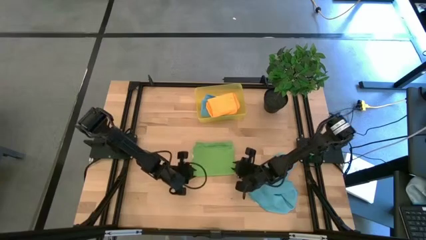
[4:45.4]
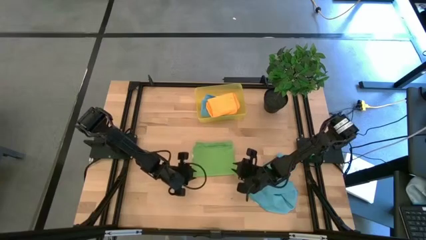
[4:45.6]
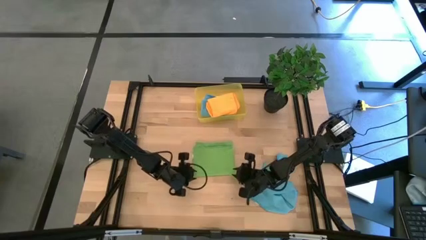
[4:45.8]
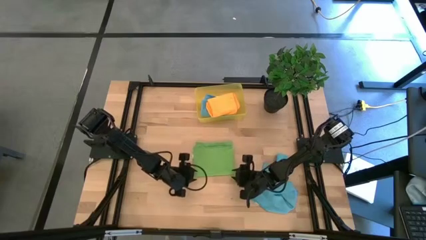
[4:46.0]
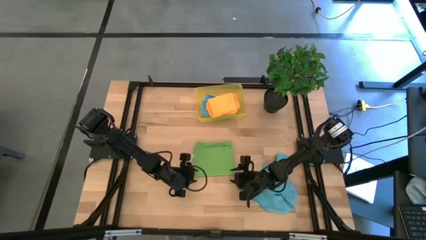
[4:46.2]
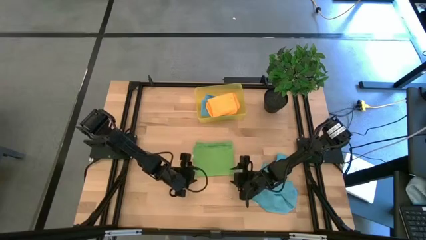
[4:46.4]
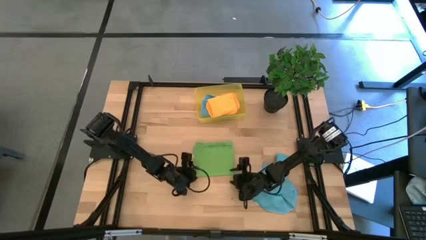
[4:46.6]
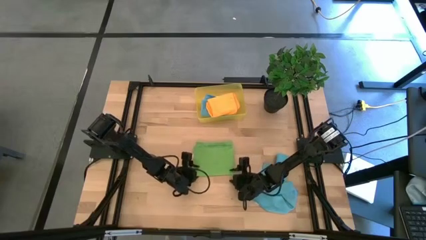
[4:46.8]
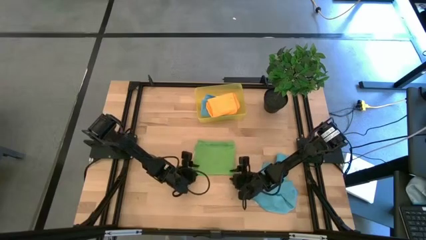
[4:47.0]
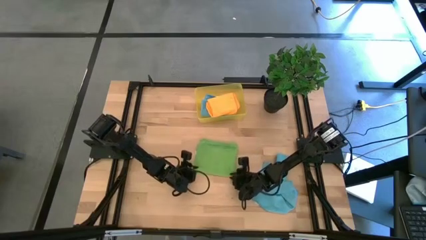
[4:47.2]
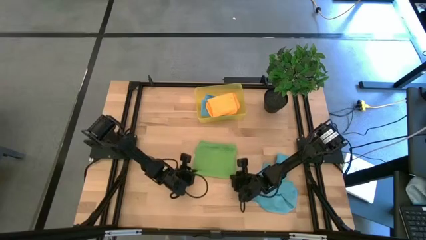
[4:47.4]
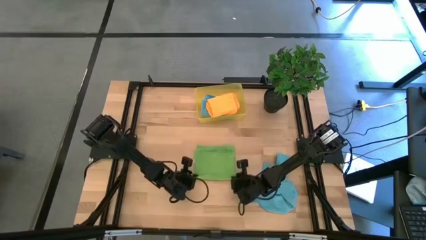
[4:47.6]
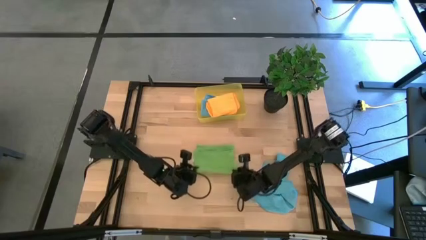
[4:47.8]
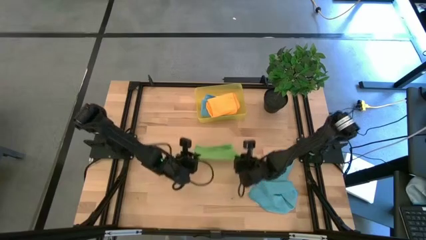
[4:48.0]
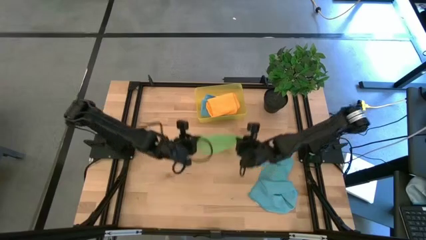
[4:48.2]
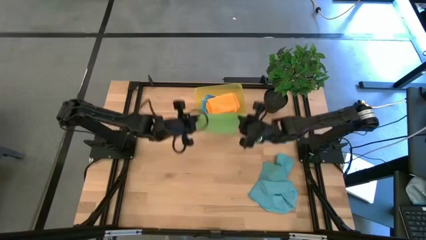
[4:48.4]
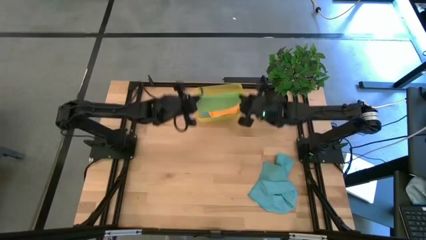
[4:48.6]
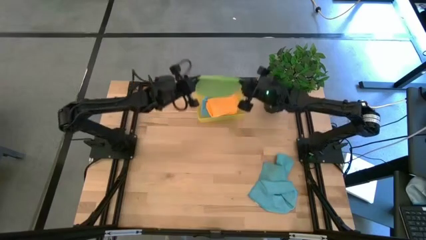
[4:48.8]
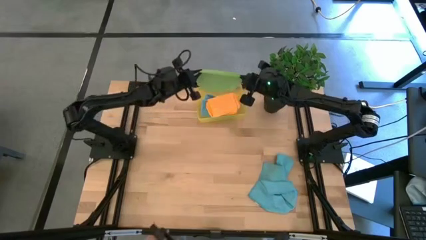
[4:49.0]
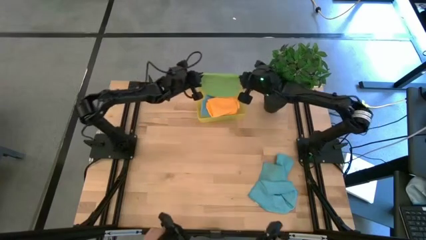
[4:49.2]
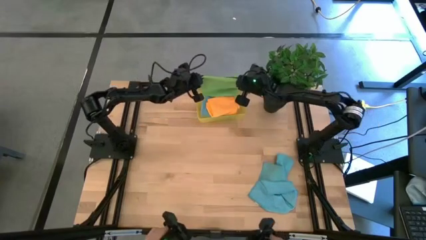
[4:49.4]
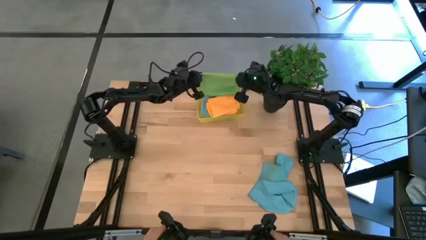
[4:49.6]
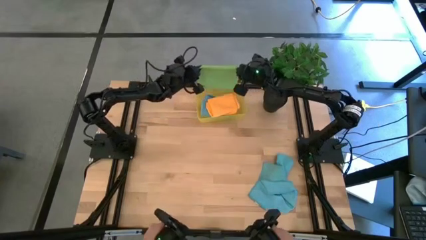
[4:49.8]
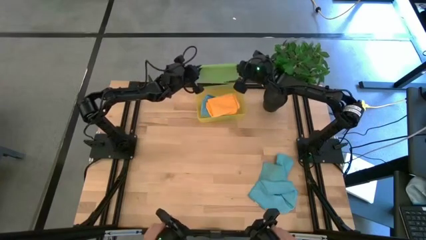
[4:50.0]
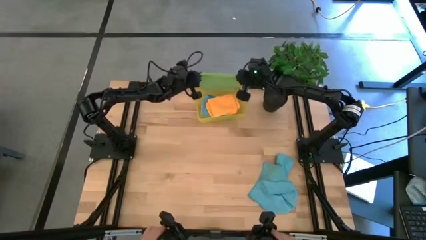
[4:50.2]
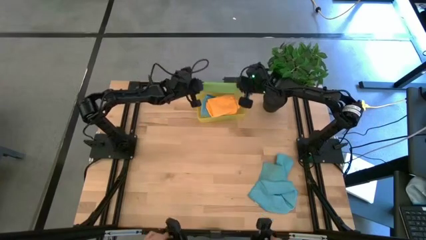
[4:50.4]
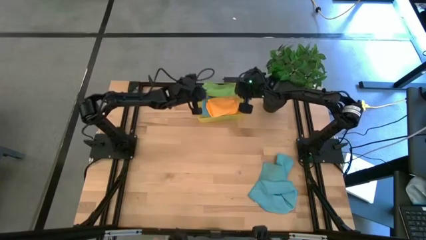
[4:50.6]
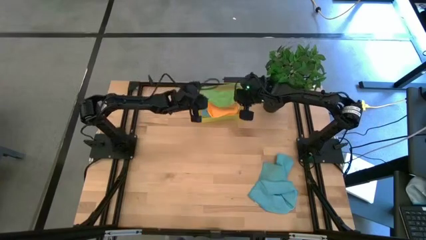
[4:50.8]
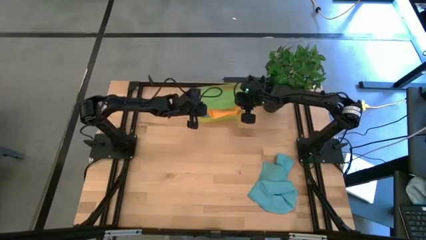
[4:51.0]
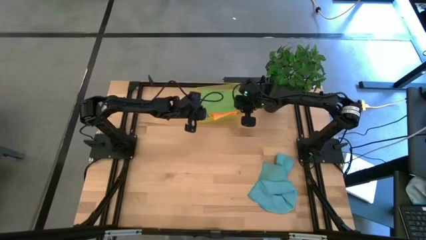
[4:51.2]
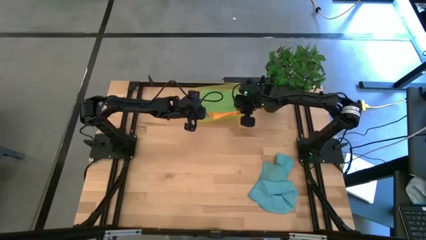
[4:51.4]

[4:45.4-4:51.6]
Task: Fold microfiber towels
Stack the folded green microfiber towel on top of the orange microfiber towel in the bin

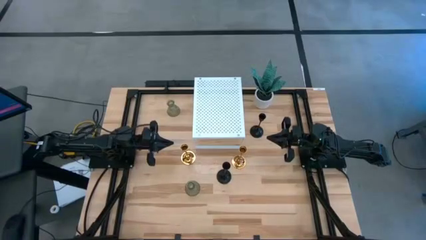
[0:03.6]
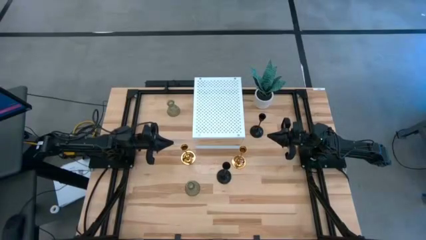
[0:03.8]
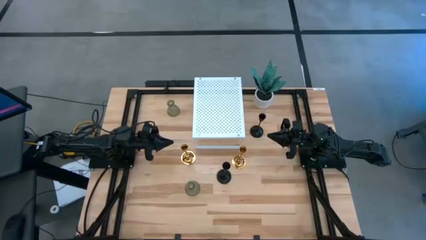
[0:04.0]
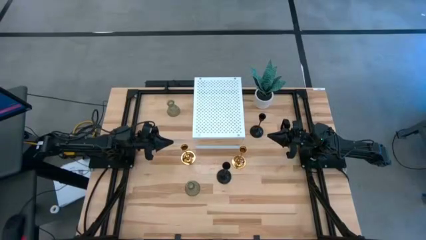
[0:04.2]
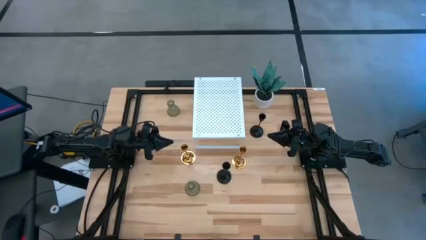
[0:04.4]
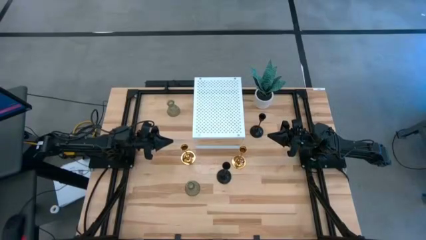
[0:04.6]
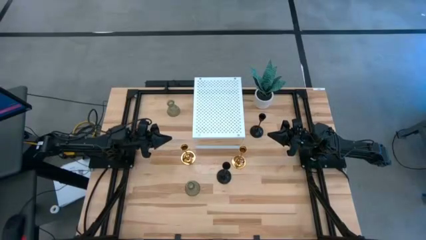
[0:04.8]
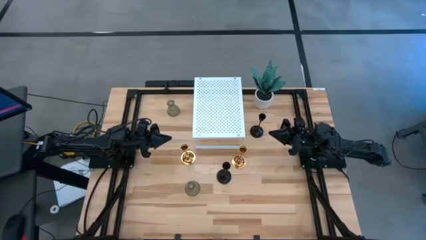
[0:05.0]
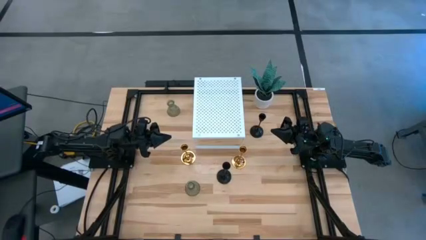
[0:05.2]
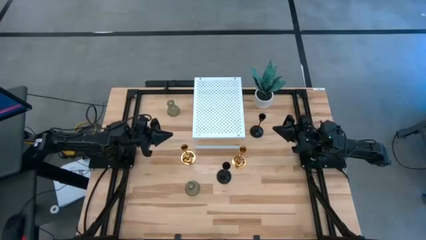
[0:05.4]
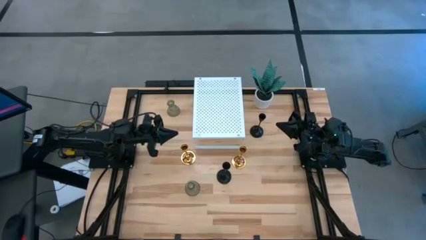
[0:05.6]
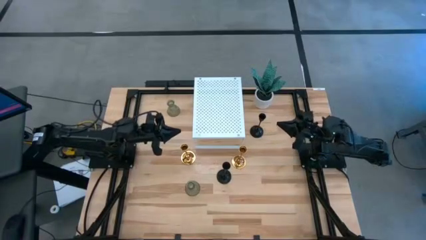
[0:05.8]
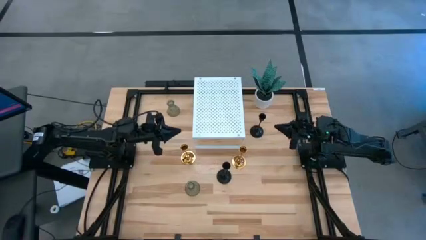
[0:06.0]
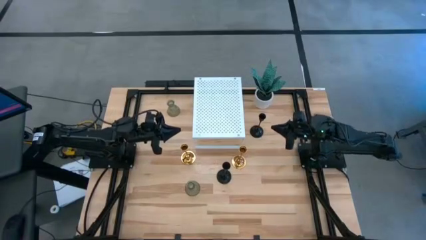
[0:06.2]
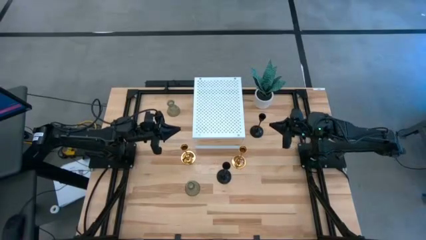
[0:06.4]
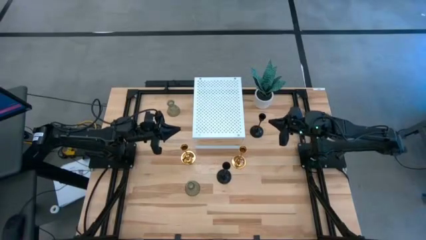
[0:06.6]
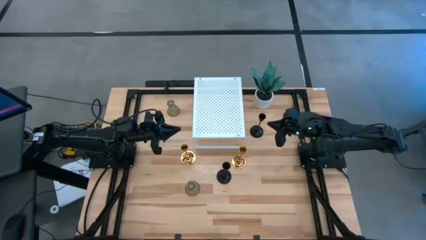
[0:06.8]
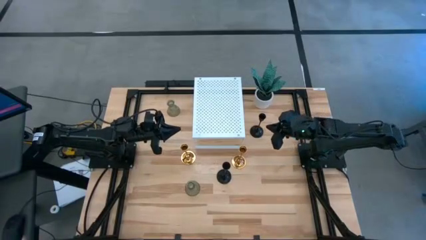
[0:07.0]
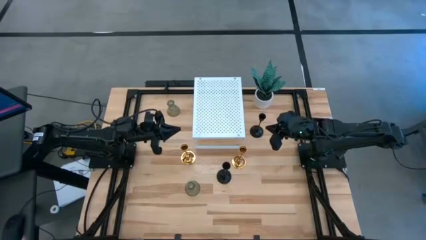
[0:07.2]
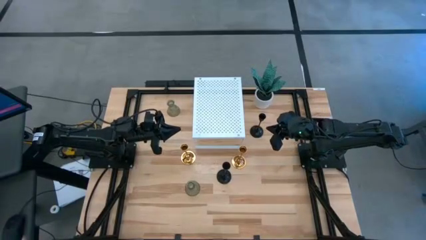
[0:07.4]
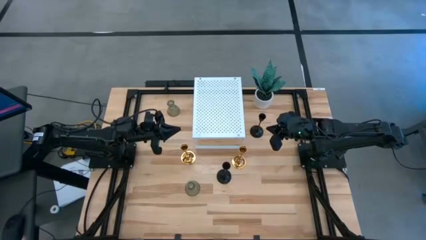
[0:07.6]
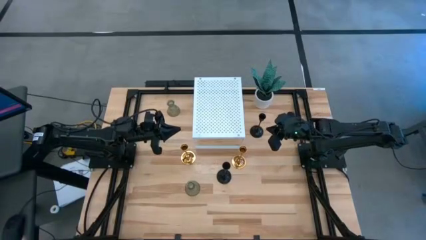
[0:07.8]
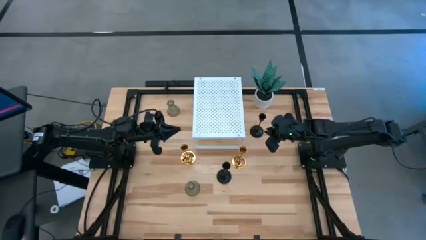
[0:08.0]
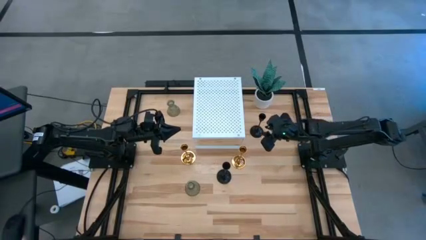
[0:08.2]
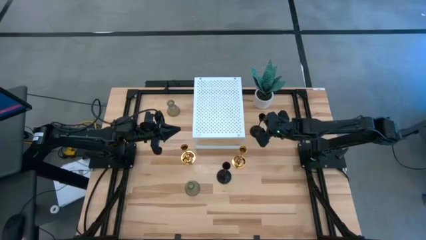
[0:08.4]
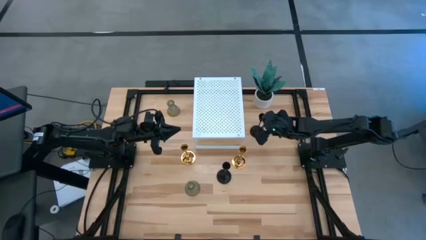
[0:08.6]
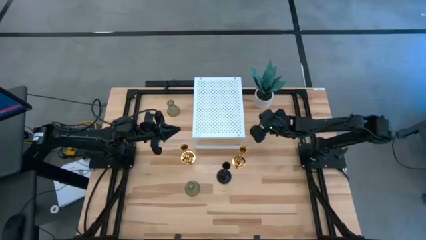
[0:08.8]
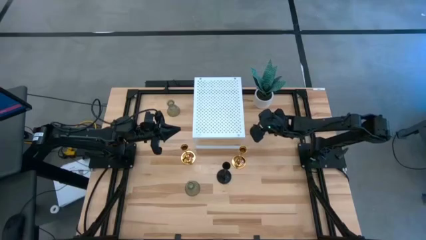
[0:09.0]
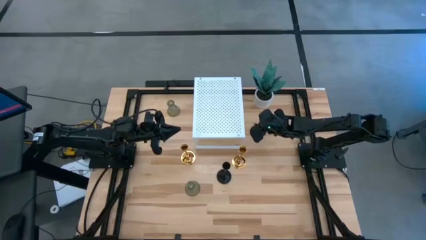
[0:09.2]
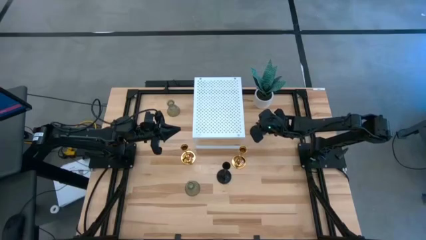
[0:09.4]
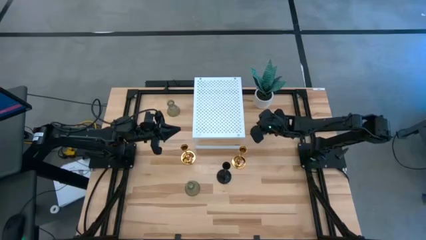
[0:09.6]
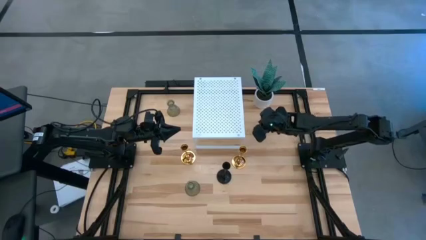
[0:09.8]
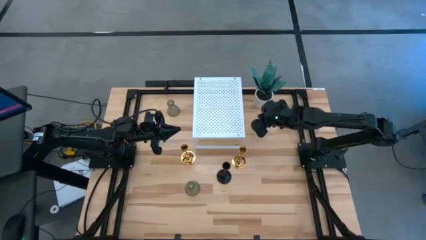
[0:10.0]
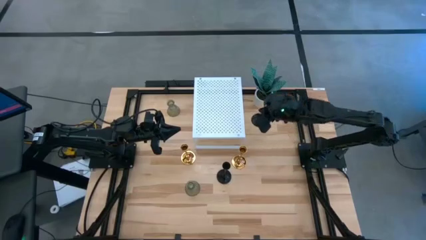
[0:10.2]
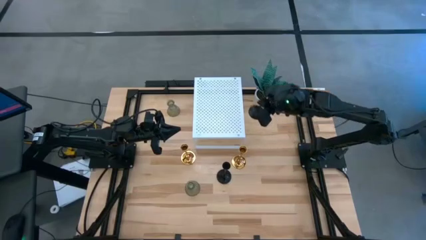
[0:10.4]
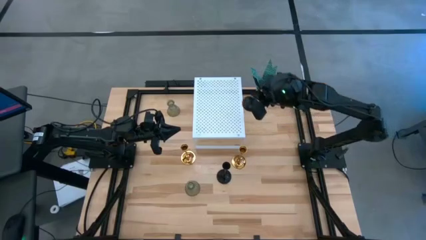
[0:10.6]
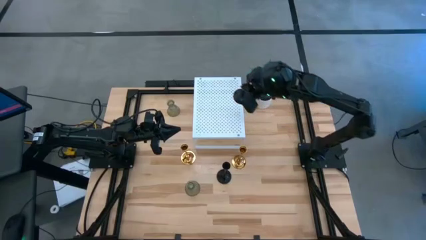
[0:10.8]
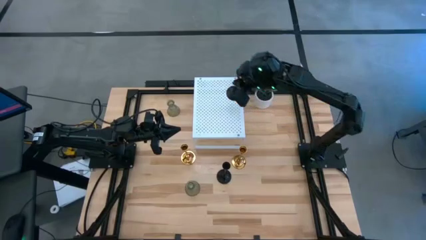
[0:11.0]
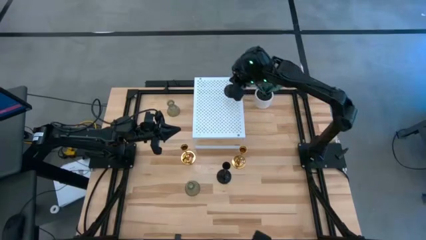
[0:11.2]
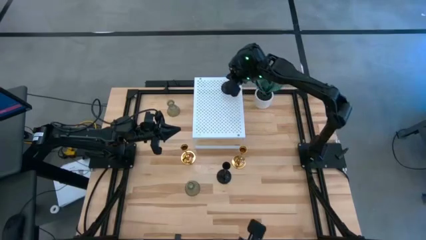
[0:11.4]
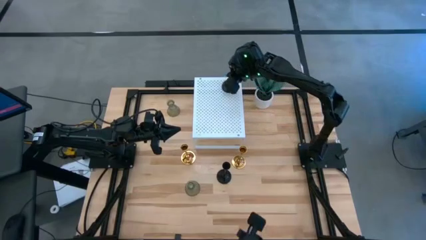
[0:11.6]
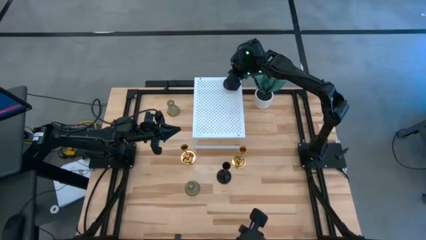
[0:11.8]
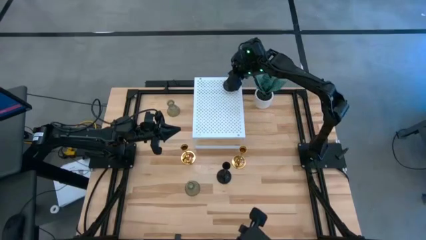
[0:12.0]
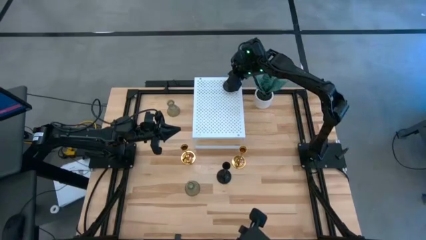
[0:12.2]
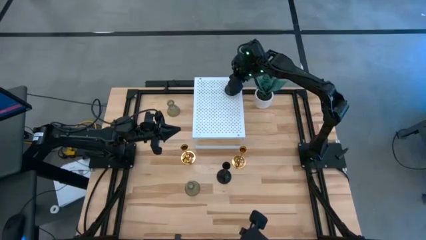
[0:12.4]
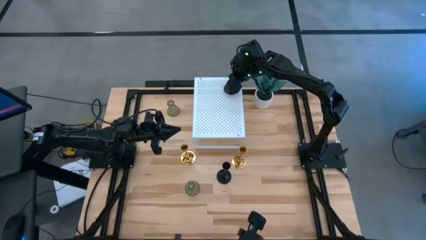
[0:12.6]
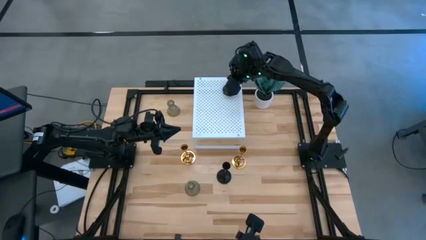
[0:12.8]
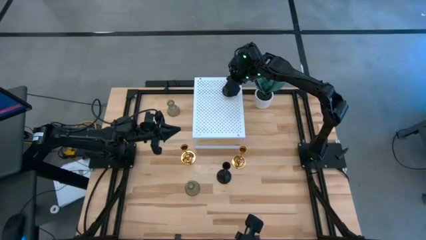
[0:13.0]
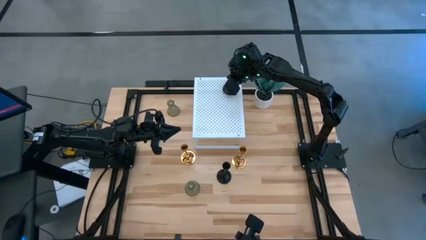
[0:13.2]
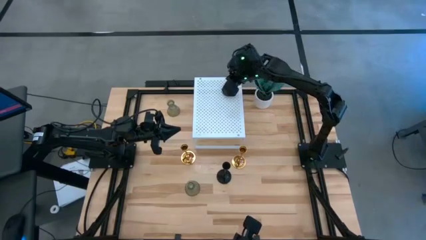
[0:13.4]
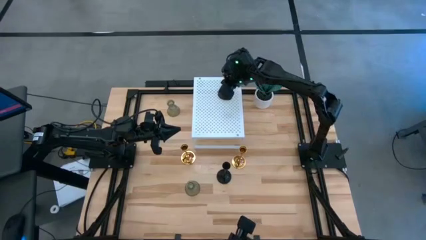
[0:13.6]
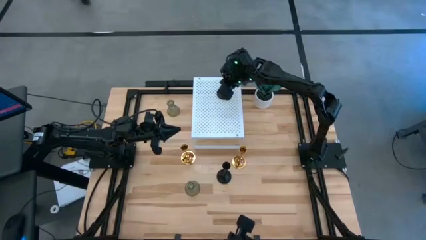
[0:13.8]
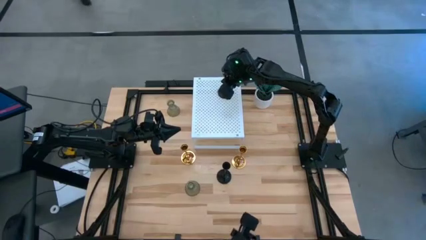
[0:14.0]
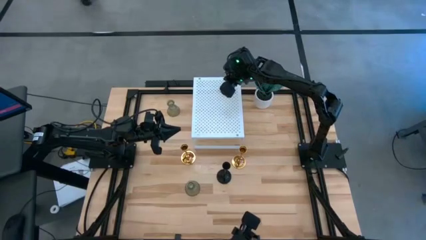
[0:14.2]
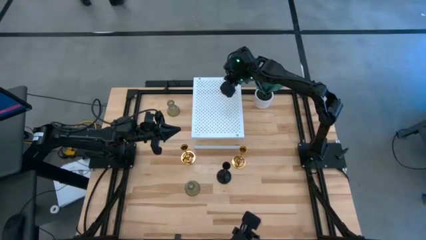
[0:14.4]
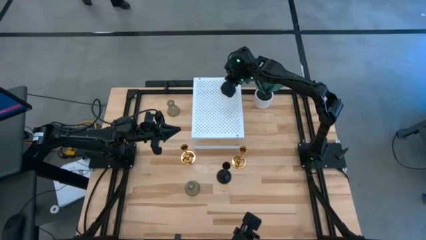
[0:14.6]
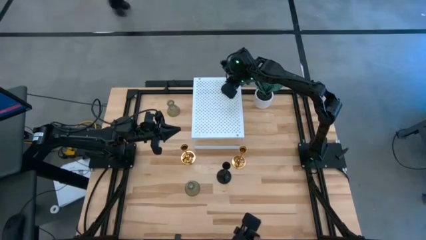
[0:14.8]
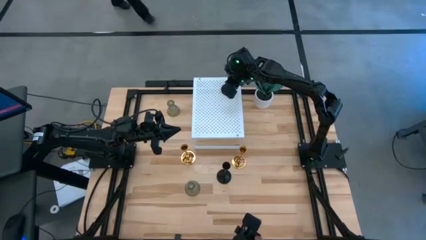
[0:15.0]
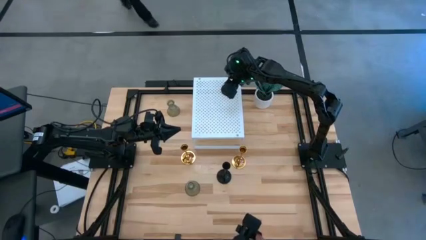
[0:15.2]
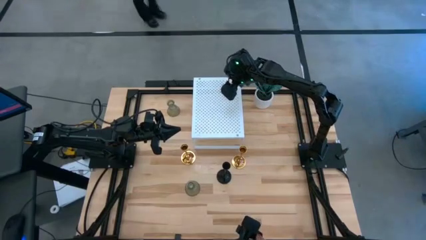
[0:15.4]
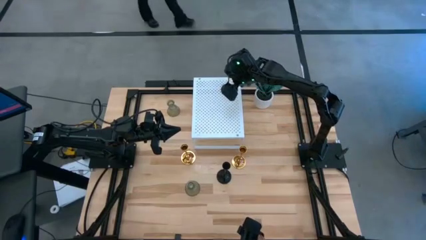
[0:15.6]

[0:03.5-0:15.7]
Task: Pick & Place candle stick holders
Put the top black candle holder on the shelf
